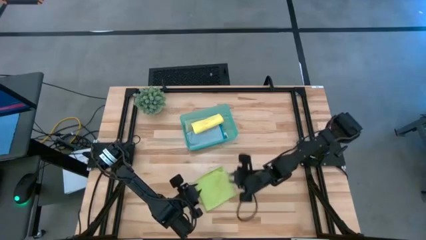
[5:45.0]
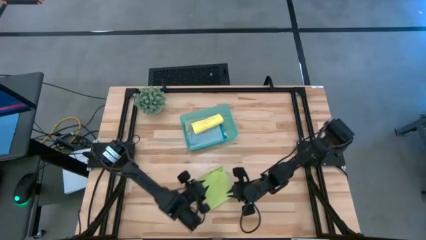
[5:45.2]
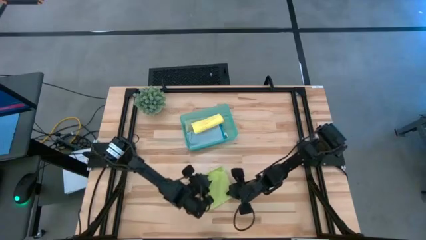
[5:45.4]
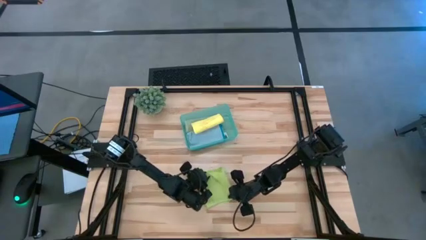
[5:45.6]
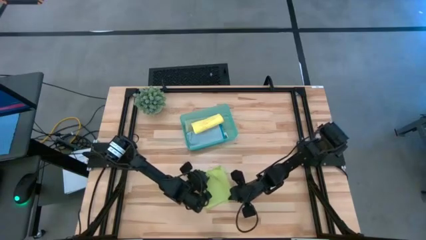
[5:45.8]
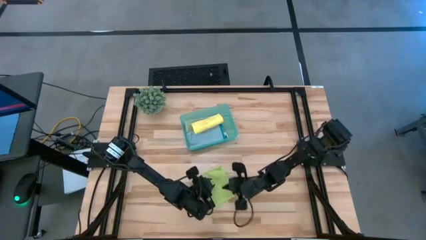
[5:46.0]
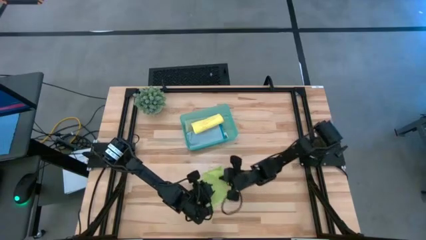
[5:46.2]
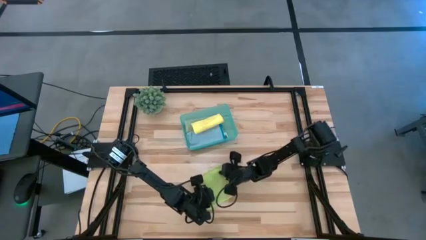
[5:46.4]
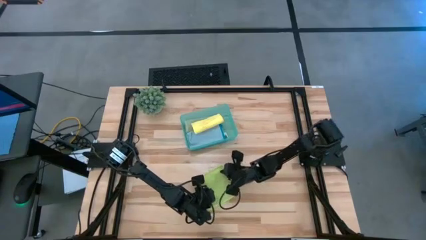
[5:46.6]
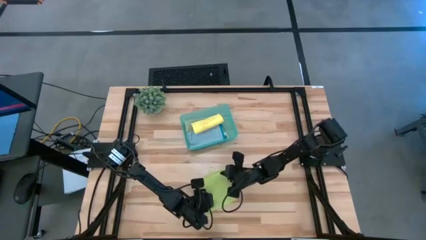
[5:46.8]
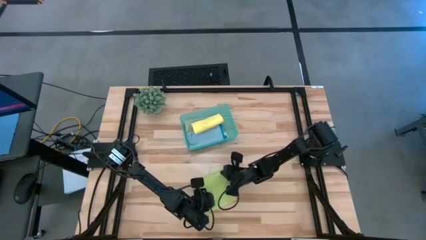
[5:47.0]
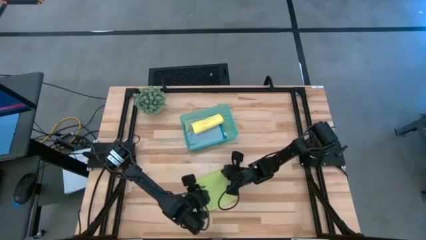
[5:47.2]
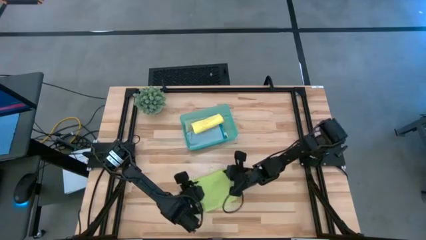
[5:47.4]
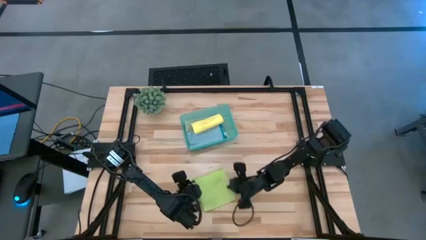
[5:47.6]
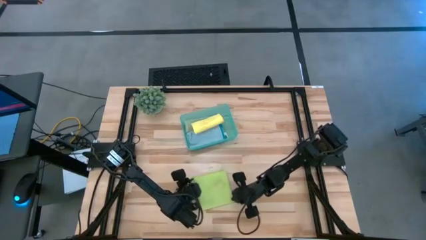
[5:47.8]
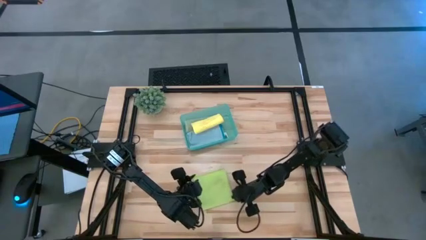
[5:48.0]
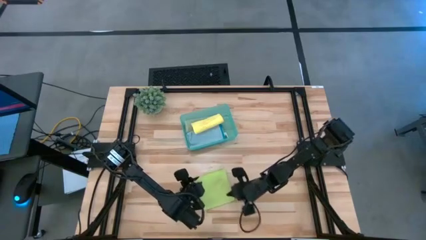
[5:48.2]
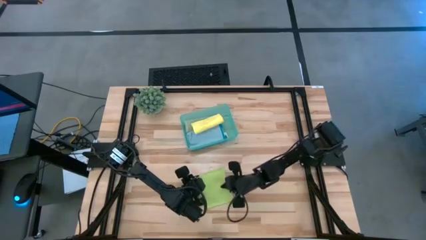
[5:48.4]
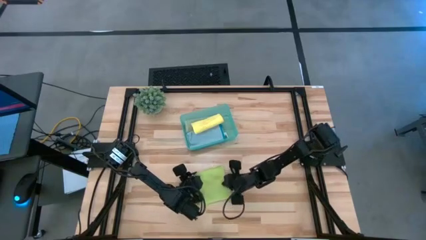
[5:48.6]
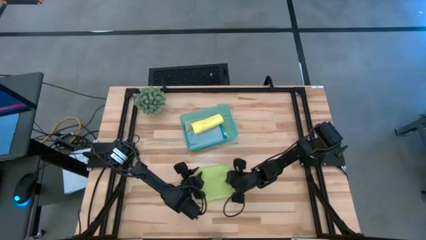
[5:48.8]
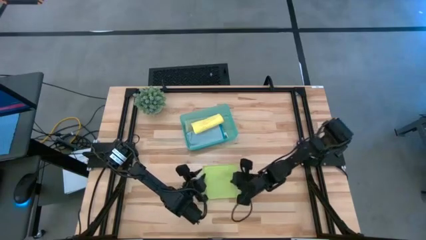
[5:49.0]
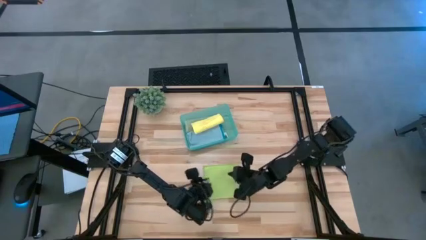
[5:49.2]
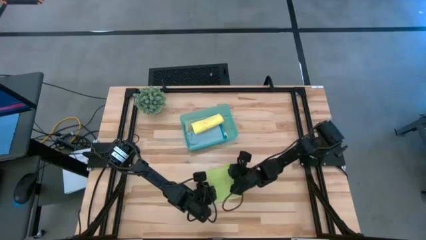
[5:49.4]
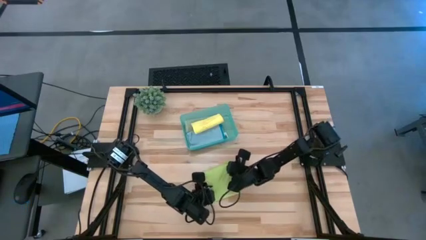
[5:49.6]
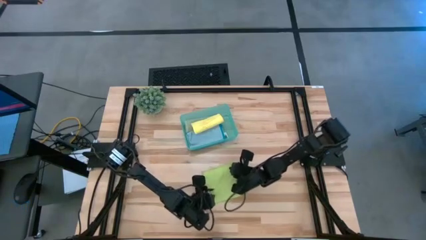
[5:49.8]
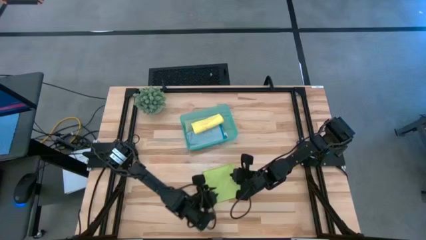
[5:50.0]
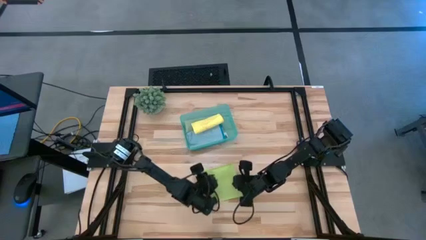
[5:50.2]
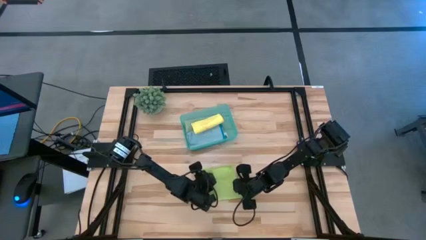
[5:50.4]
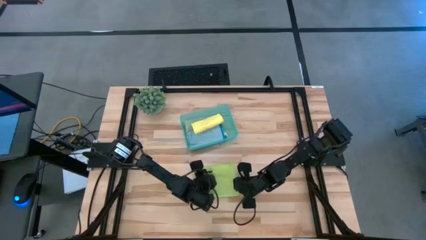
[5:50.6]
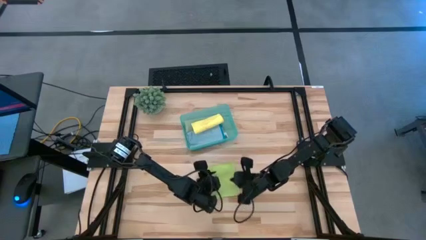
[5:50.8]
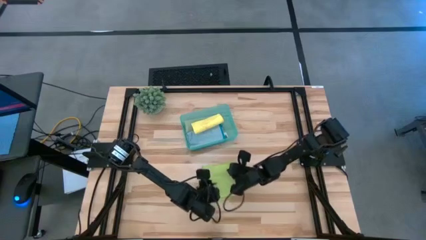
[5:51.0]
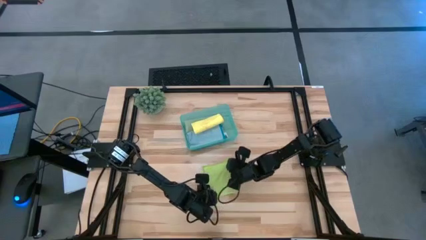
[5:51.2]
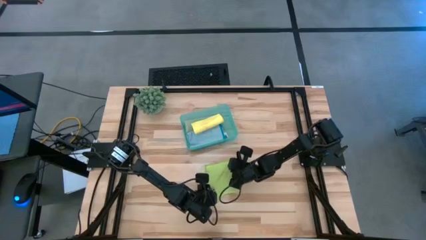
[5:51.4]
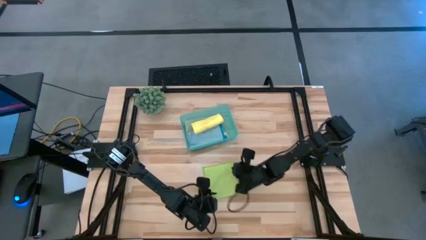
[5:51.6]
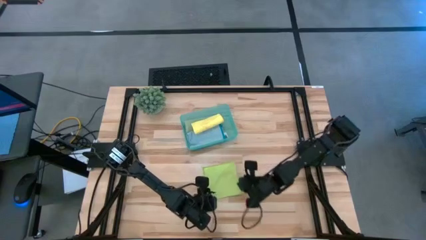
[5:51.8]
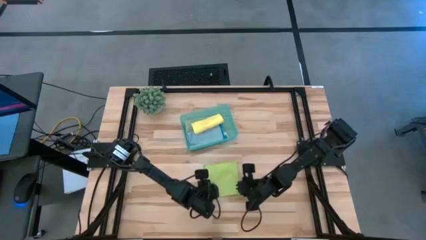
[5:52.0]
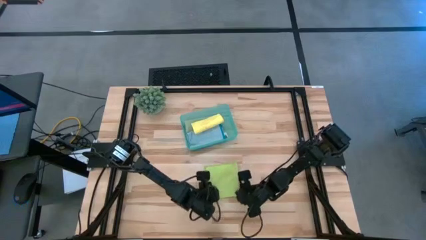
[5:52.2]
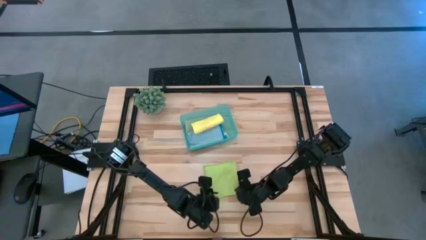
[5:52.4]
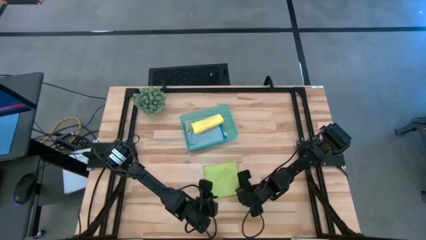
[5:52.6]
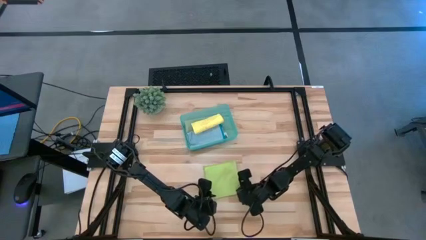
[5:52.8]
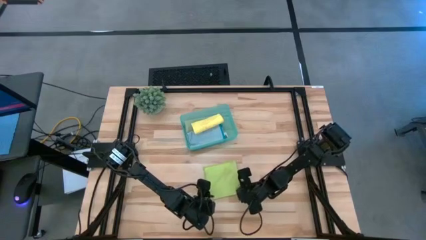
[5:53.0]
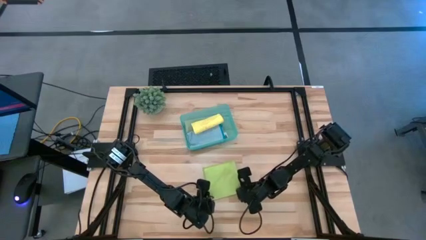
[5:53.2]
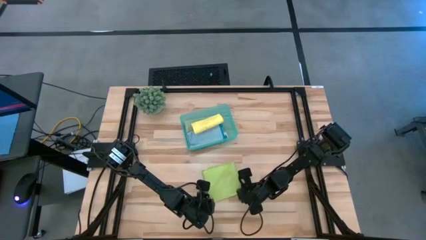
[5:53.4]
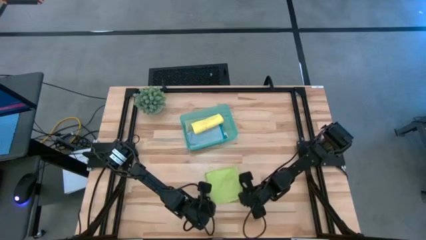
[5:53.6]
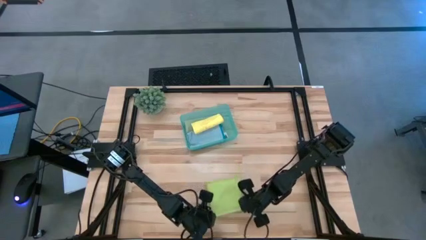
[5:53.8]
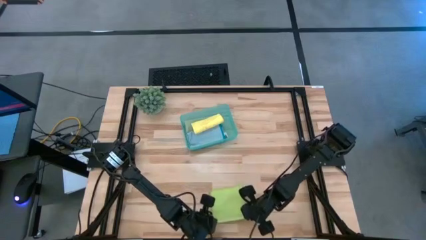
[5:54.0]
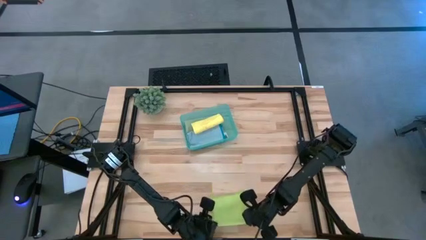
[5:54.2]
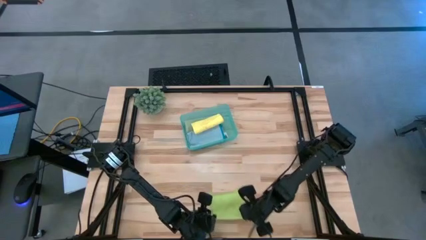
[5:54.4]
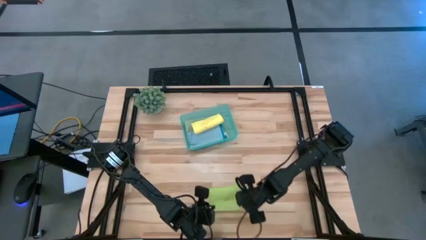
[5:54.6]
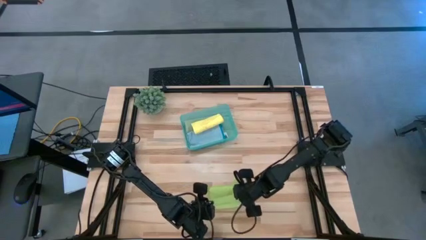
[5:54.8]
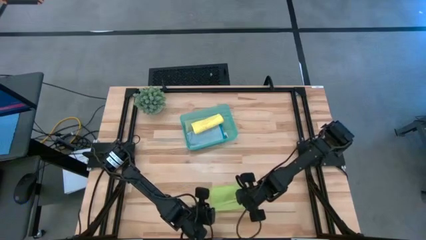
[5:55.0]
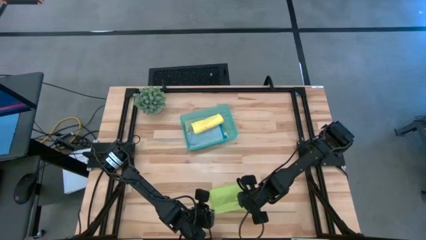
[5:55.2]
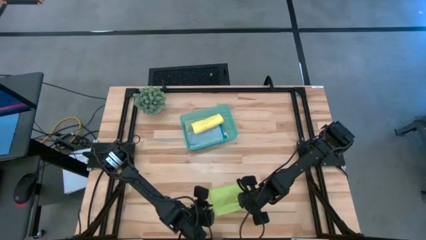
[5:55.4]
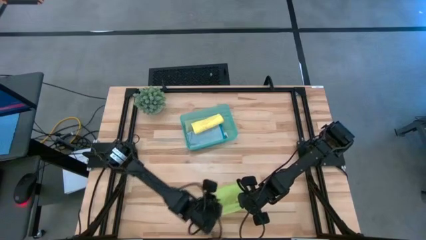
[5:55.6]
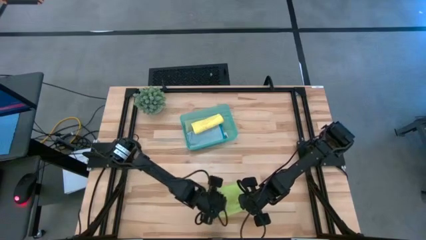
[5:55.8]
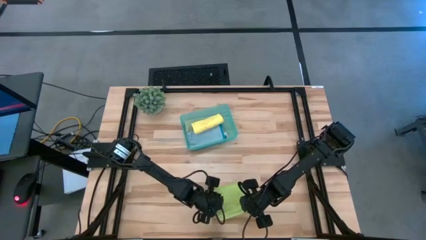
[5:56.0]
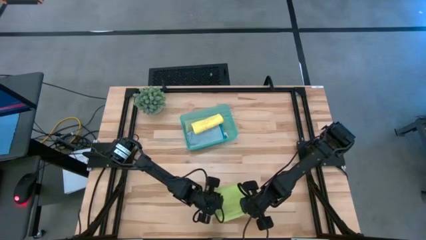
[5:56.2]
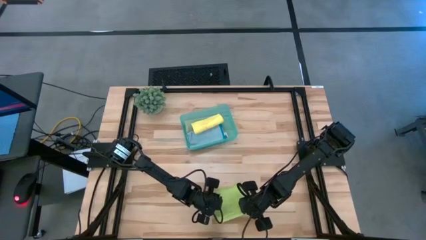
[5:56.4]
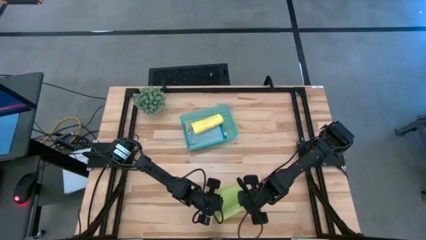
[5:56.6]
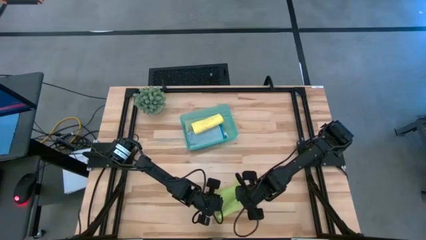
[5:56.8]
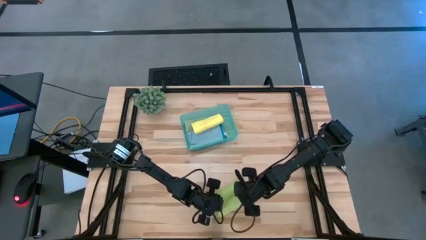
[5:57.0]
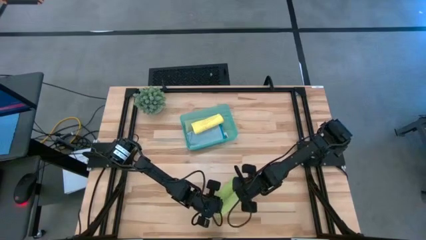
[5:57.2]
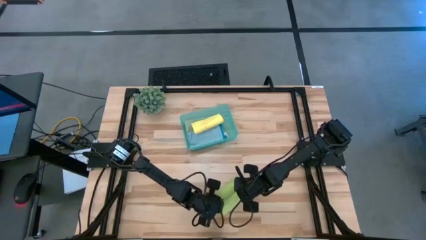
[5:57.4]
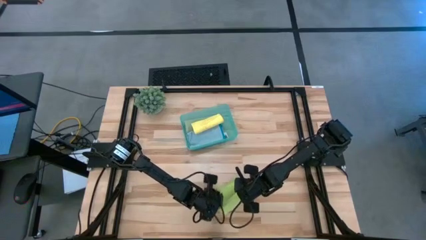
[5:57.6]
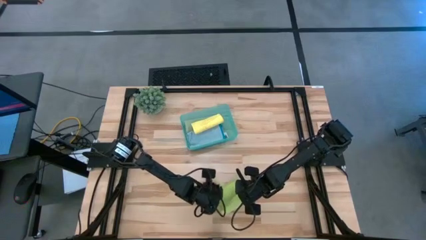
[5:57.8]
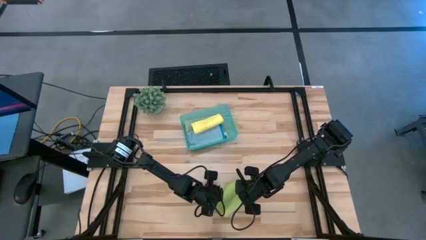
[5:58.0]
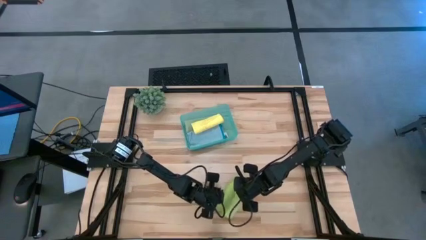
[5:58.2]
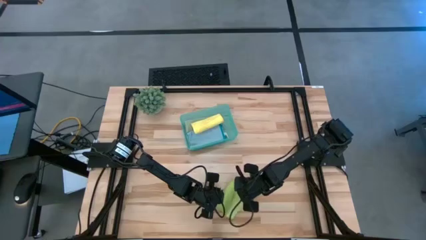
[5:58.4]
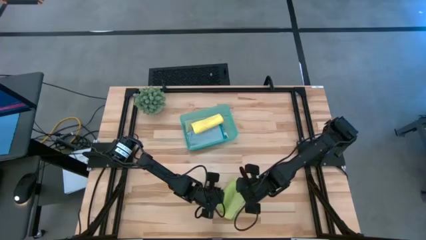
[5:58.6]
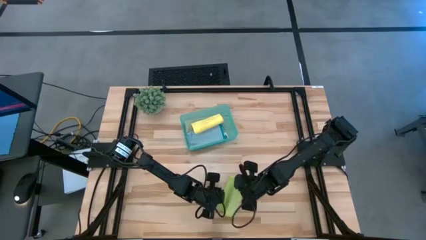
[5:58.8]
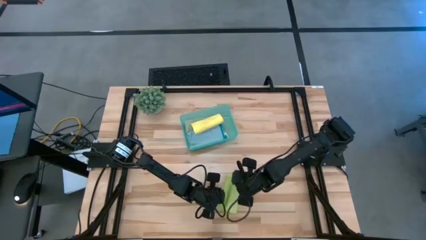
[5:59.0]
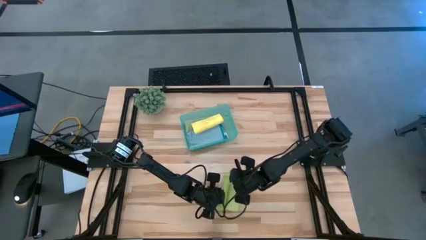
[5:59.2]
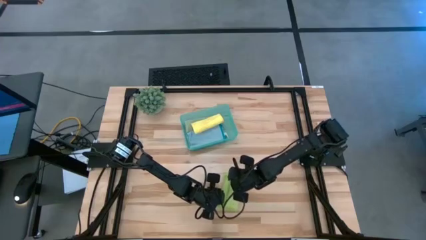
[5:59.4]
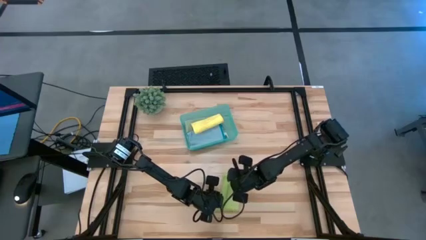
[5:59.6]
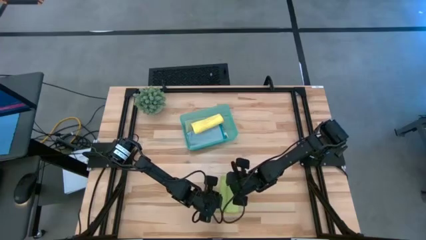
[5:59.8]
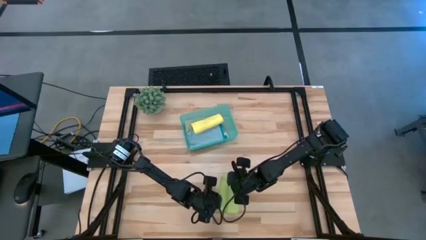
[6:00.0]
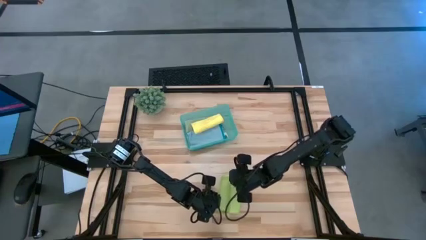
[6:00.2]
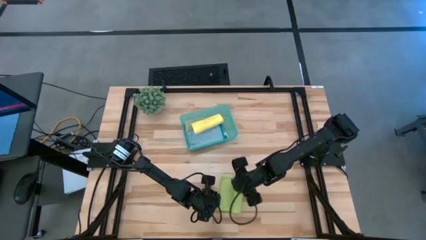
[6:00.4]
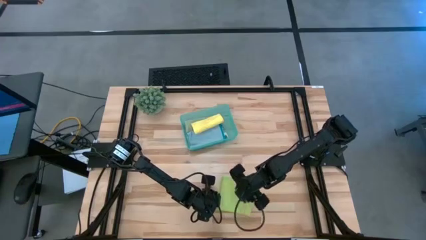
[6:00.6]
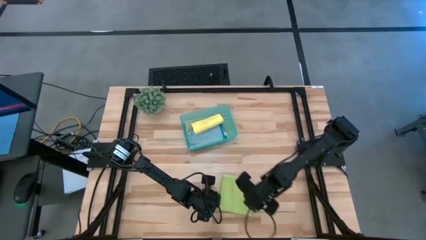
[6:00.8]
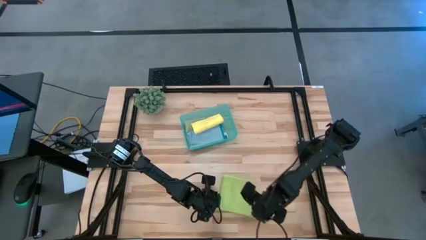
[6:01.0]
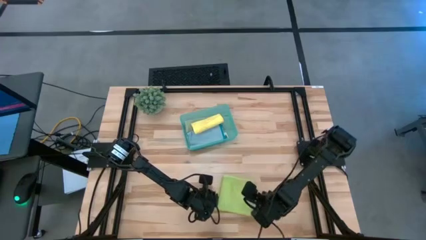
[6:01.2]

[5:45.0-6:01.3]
Task: Fold microfiber towels
Fold the light green towel
